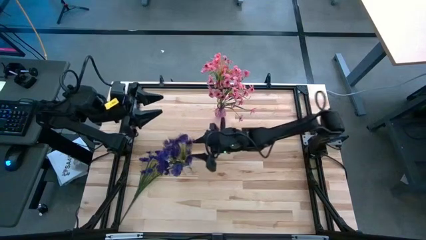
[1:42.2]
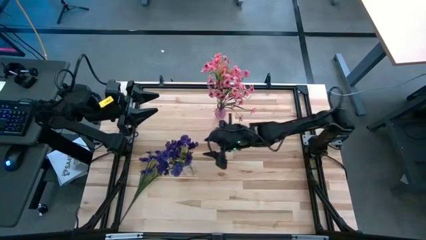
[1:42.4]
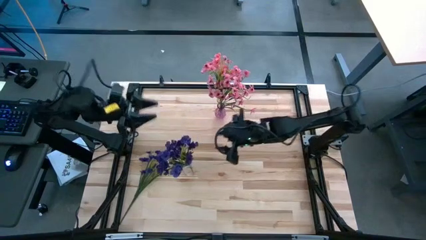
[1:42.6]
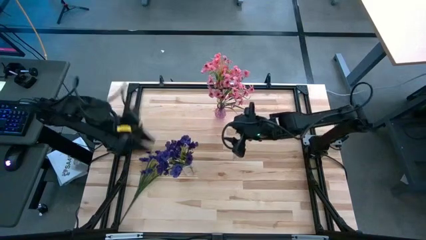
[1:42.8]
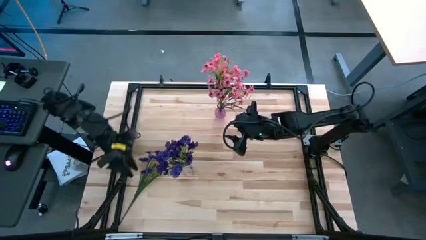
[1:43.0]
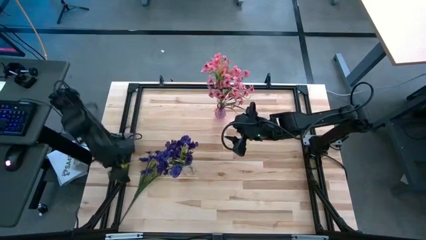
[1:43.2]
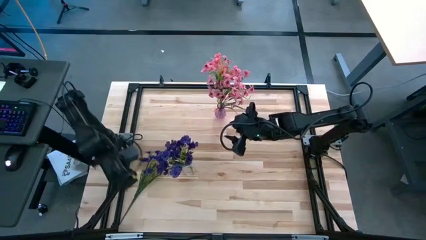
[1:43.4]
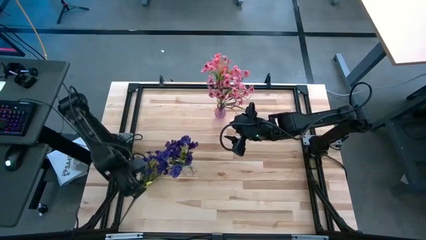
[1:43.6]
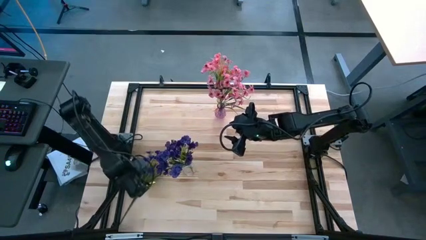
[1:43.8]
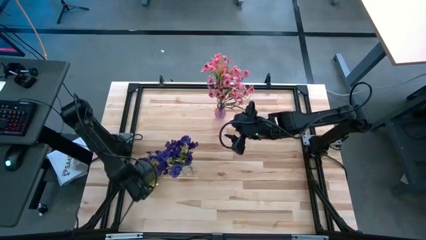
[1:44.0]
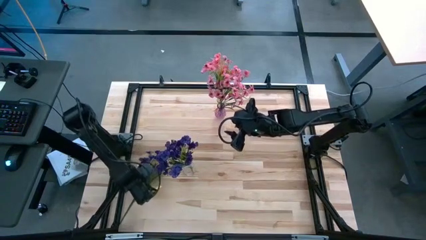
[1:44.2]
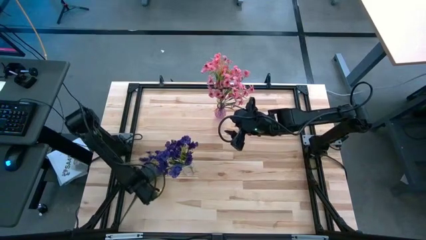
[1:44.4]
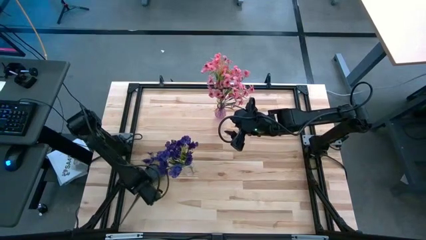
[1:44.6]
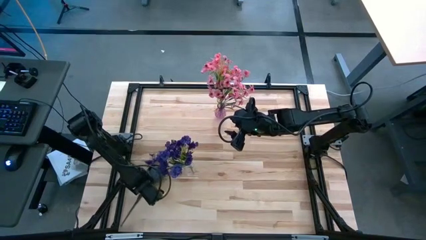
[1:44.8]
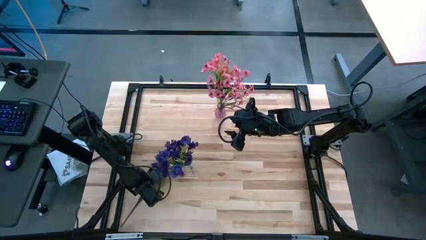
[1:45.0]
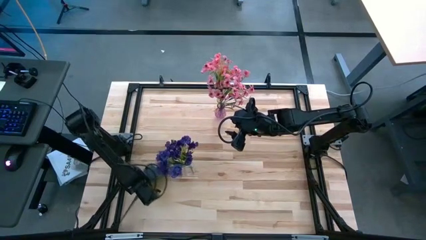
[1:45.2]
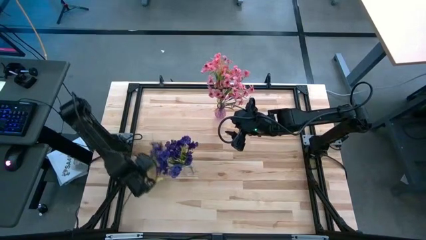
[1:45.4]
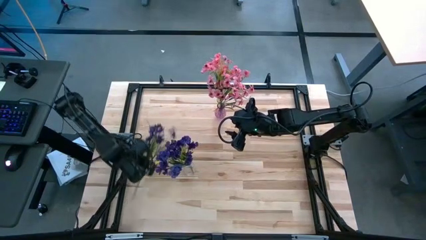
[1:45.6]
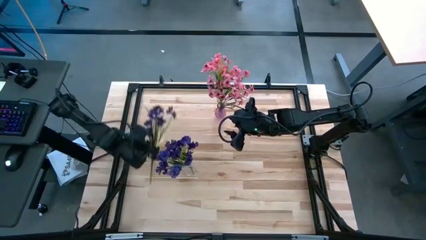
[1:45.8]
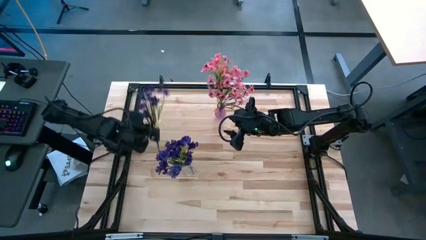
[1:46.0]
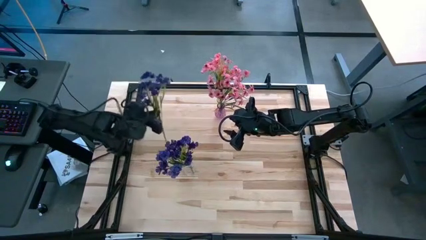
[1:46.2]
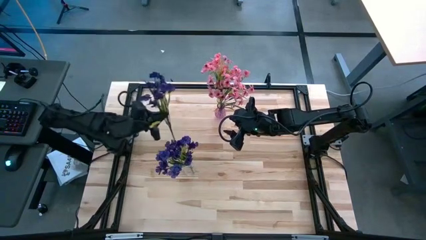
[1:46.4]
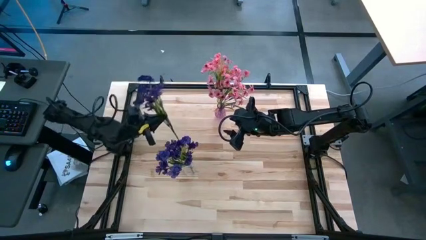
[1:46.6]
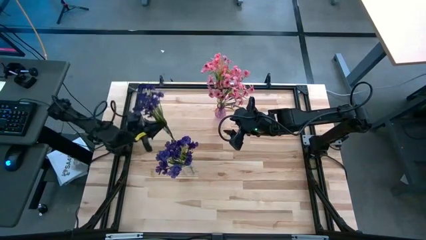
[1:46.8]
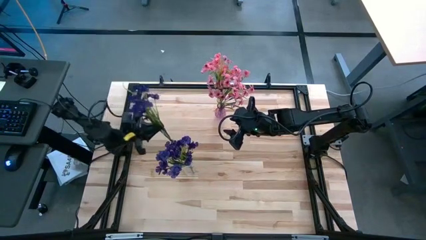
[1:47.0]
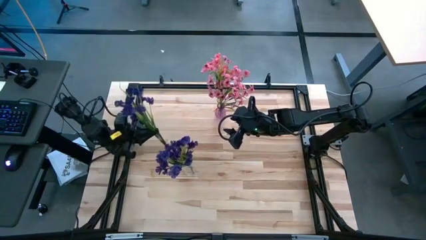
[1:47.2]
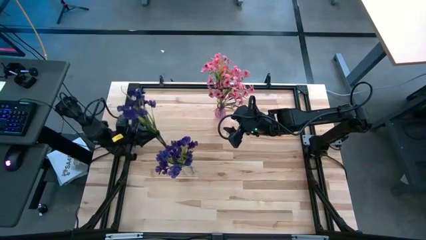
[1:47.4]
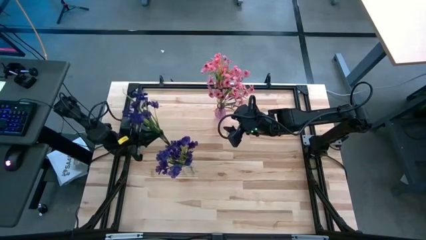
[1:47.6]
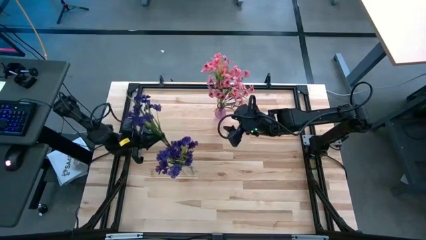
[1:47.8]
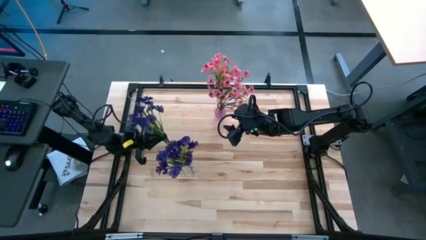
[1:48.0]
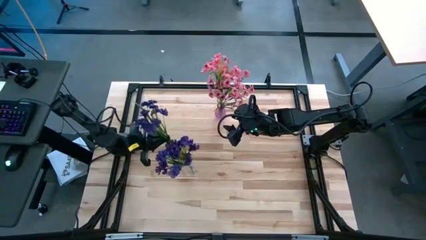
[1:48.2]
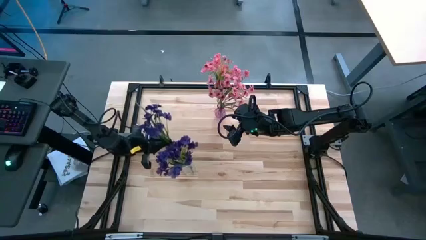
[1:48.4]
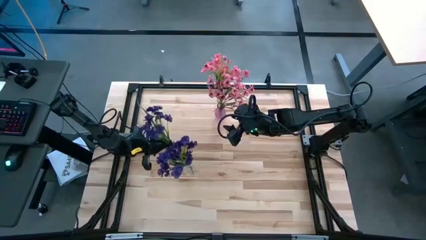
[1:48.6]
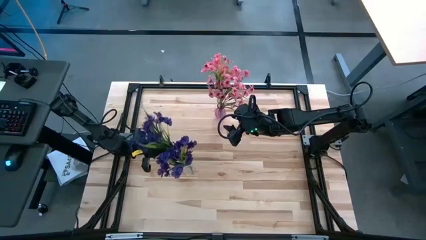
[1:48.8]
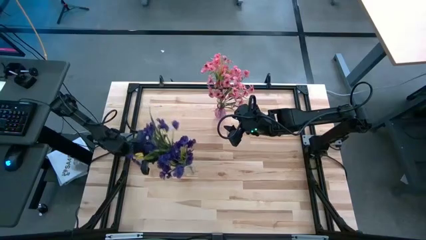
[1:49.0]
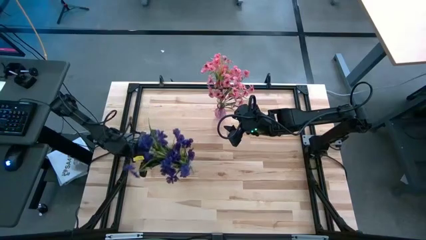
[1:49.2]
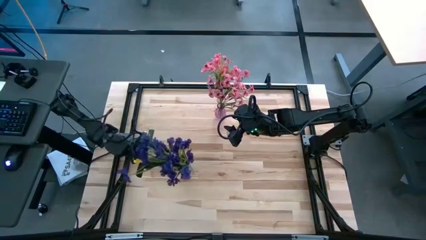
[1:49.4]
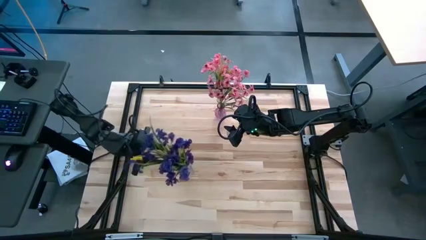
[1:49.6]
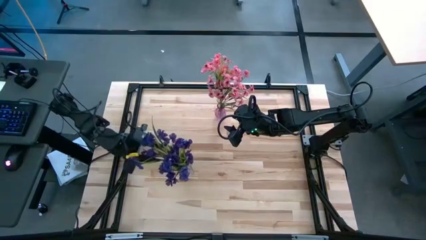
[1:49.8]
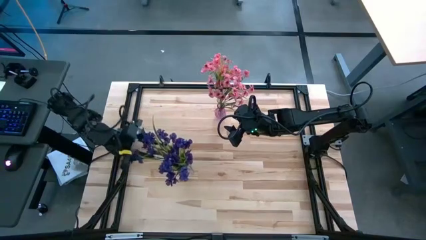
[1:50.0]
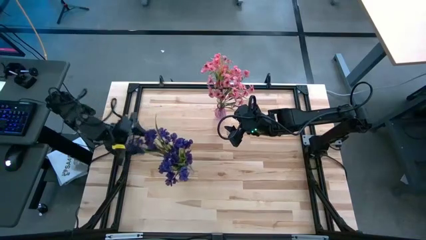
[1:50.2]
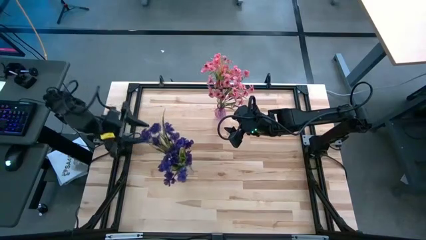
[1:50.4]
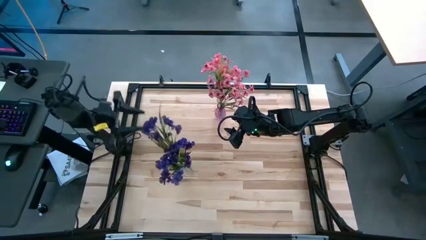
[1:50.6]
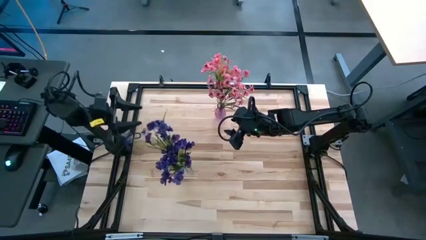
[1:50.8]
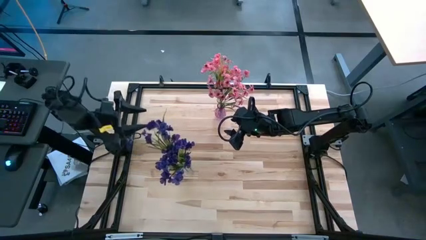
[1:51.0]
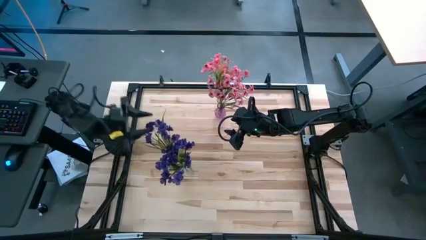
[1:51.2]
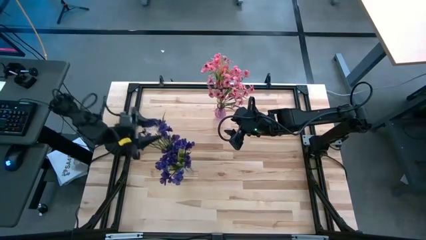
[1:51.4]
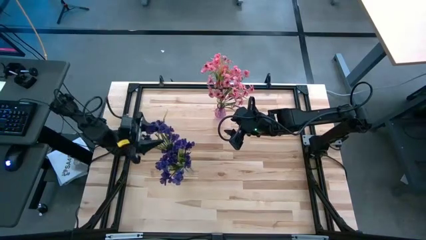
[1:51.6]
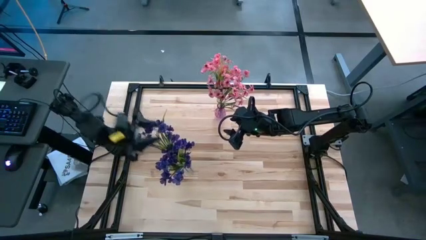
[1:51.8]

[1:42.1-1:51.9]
Task: Sort flowers into vase by color
Put the purple flowers into the transparent vase

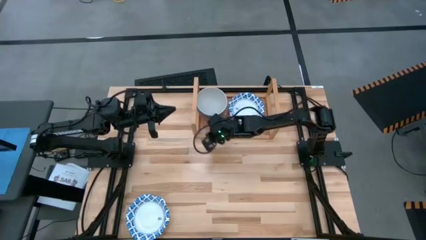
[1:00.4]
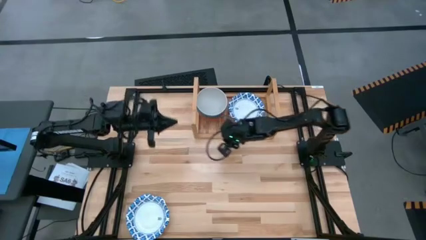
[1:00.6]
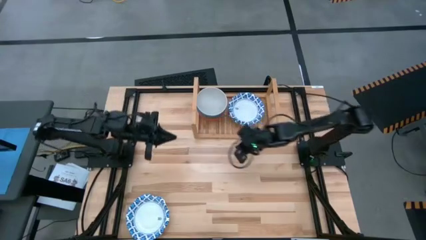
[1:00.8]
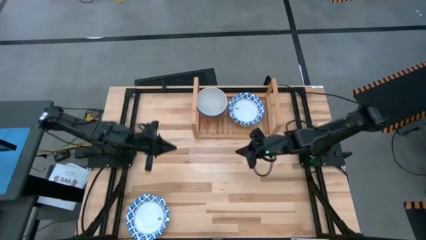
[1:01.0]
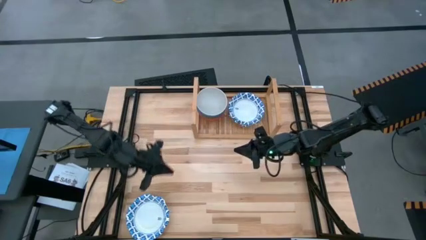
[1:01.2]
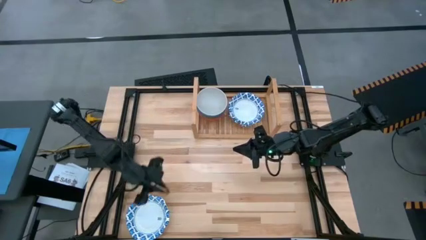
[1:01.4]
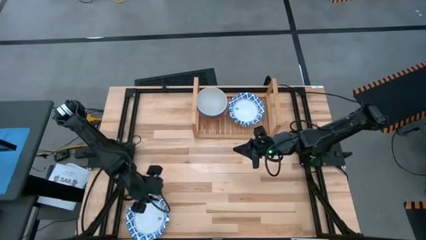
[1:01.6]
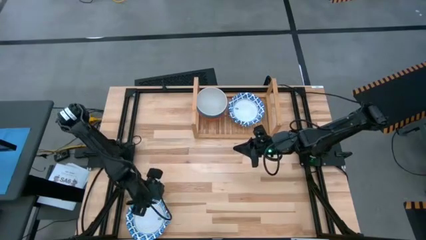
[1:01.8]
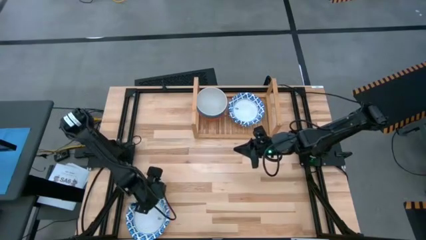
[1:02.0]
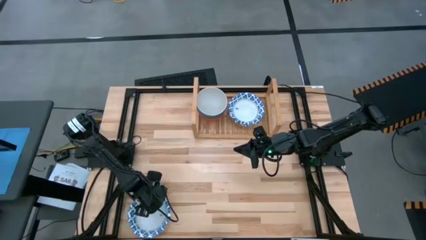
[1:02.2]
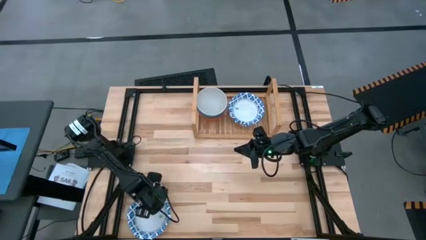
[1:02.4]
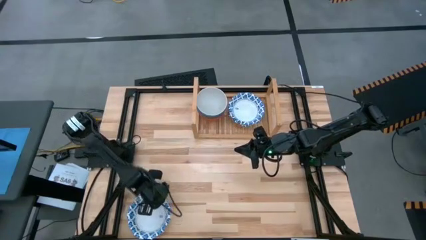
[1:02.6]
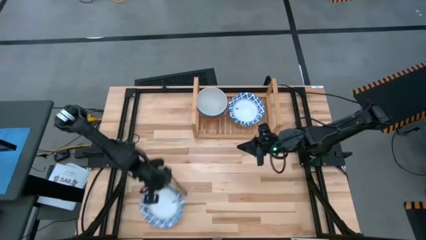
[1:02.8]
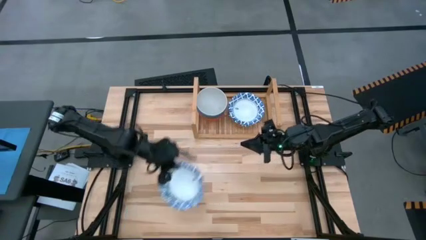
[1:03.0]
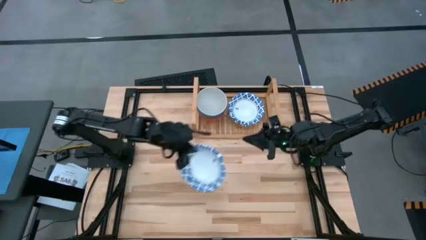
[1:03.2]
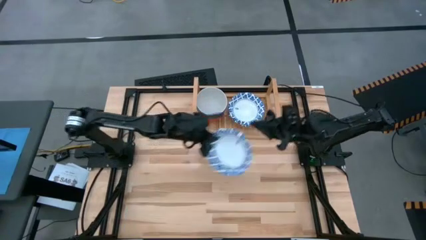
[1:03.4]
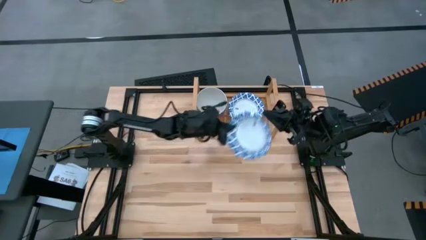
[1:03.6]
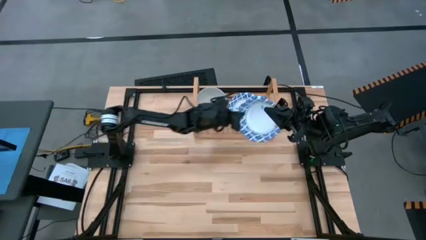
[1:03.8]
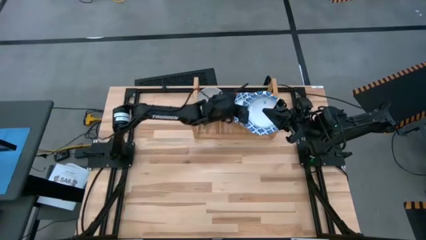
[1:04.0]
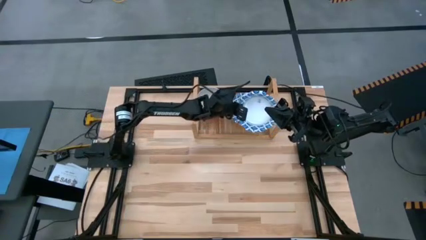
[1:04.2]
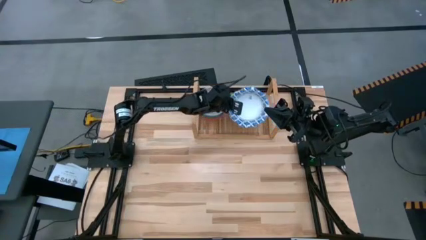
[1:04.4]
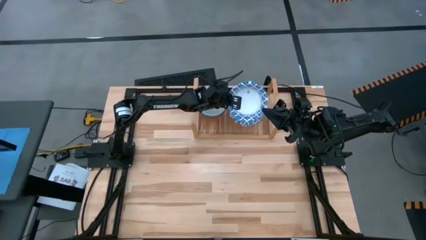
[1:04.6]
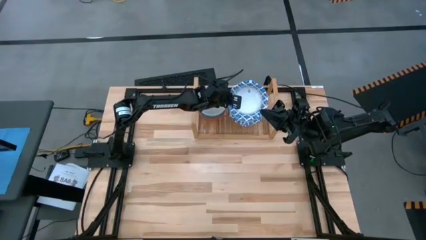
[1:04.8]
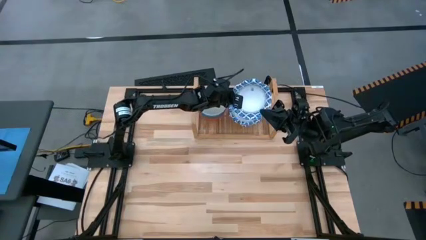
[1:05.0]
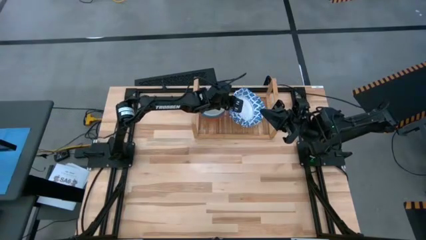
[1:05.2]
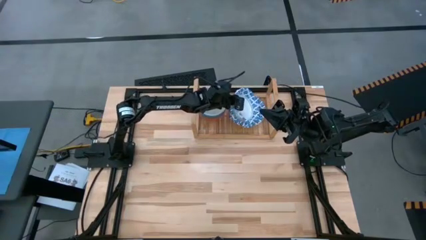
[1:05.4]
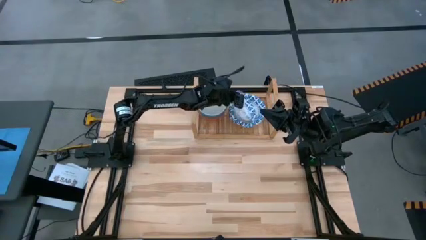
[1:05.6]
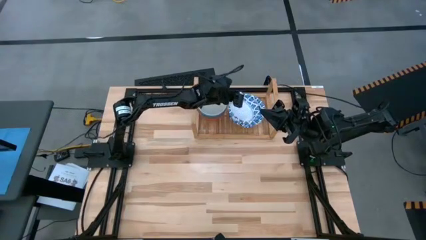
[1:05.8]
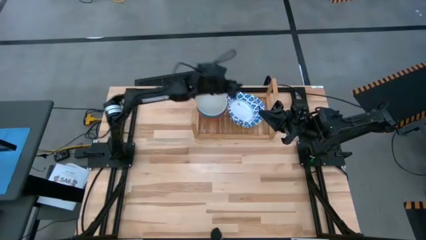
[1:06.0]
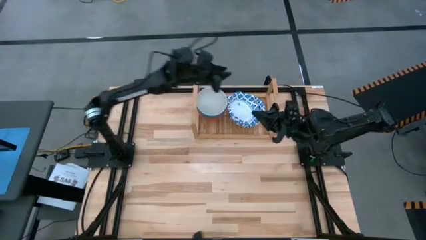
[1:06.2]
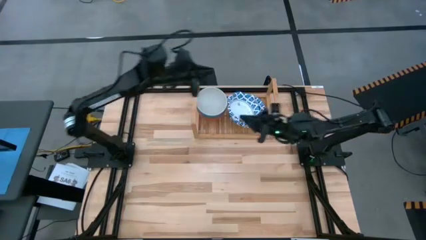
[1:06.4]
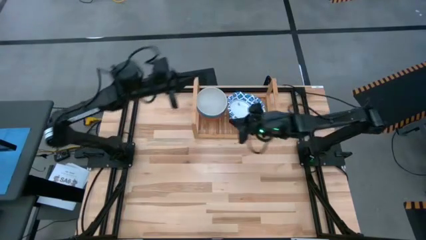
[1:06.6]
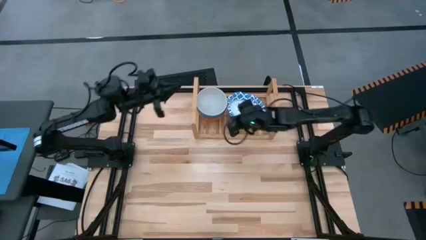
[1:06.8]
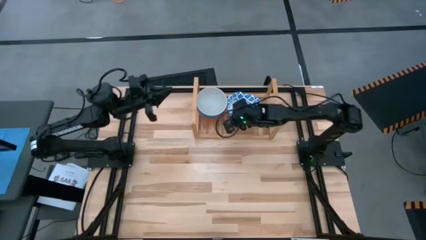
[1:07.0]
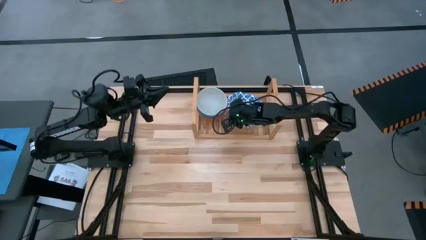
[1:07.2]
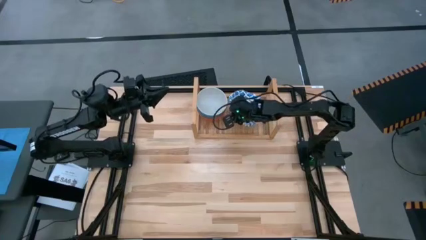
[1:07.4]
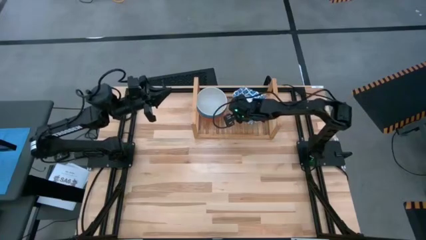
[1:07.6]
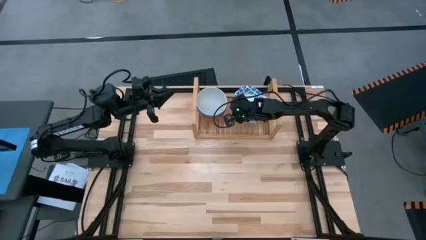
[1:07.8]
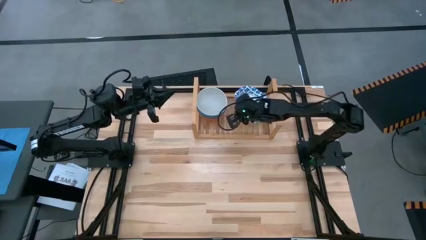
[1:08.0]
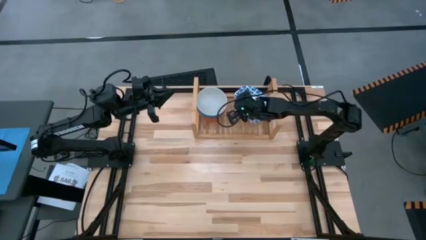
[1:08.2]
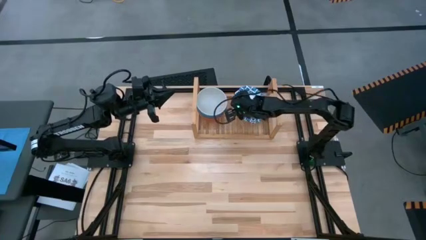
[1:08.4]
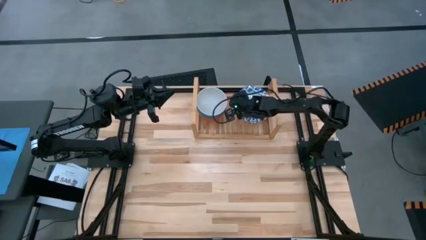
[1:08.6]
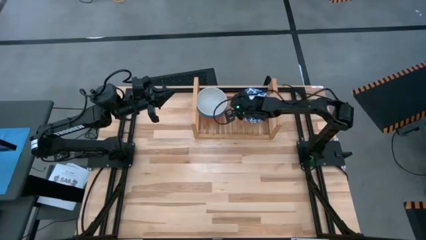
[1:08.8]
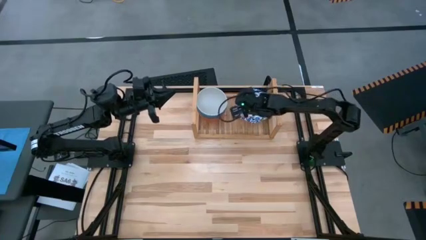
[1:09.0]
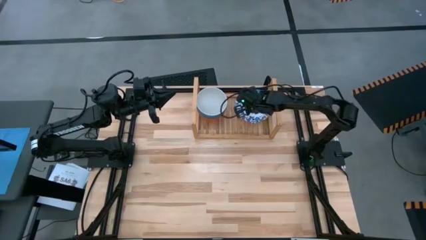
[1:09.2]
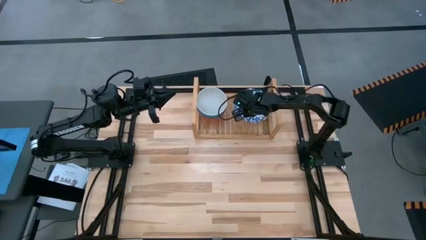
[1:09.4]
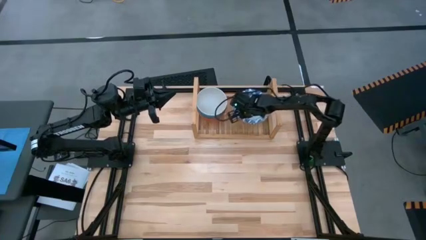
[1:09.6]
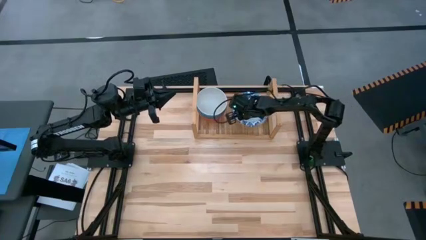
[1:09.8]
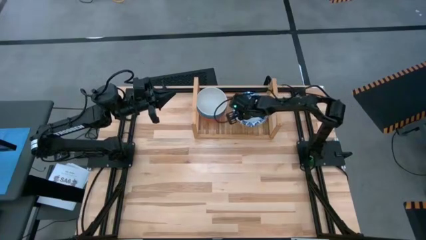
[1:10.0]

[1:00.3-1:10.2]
Task: Place and stack bowls onto a shelf
Stack the blue patterned bowl on top of the blue patterned bowl on the shelf
